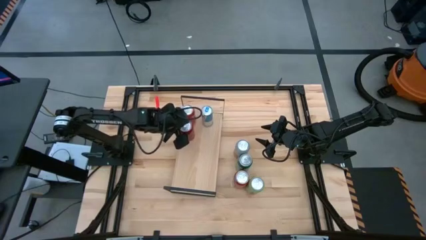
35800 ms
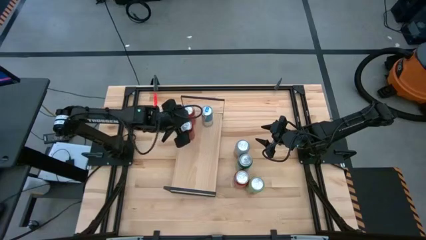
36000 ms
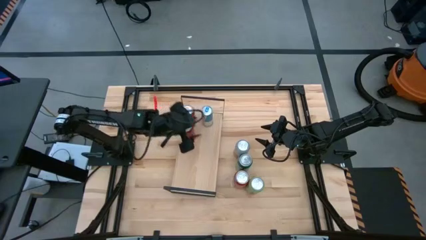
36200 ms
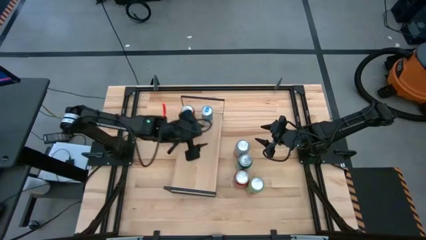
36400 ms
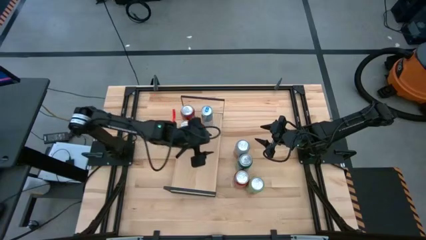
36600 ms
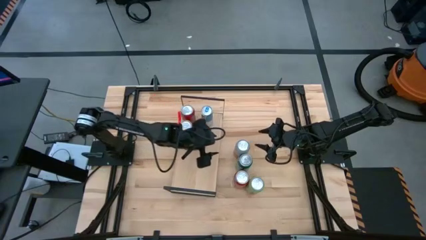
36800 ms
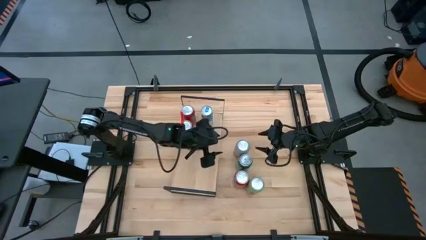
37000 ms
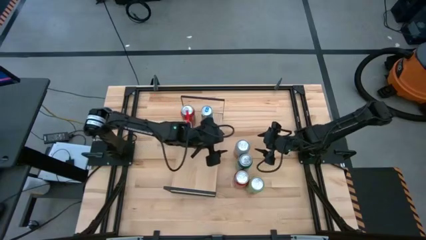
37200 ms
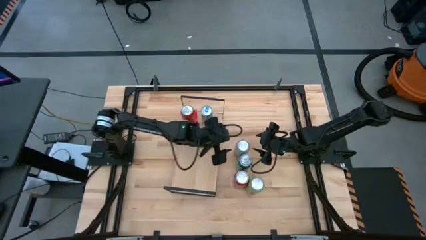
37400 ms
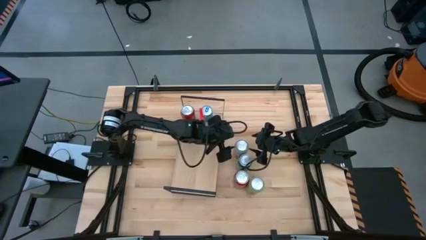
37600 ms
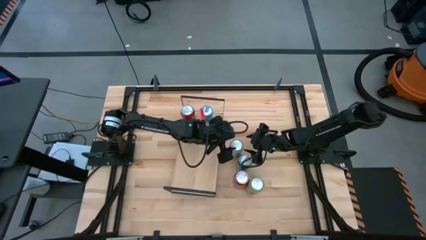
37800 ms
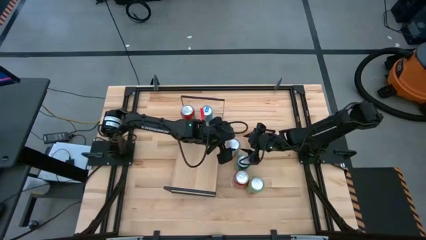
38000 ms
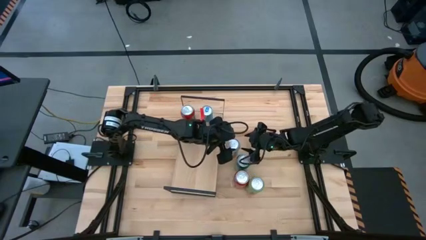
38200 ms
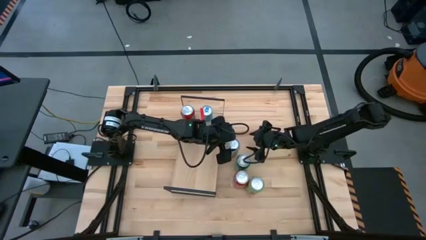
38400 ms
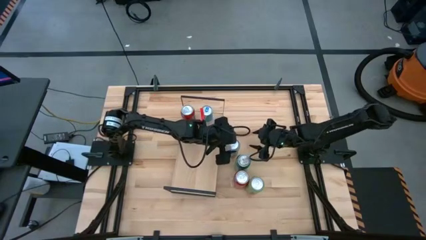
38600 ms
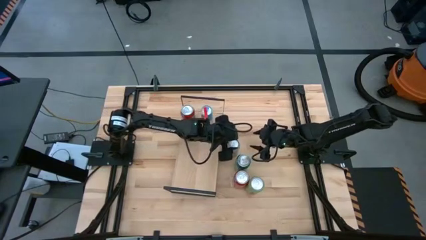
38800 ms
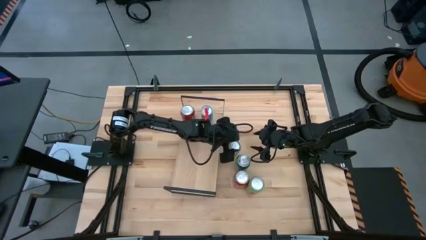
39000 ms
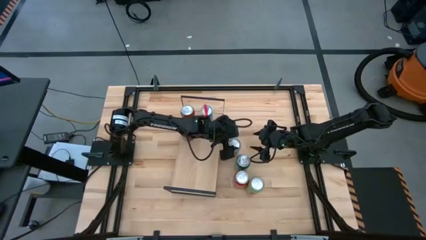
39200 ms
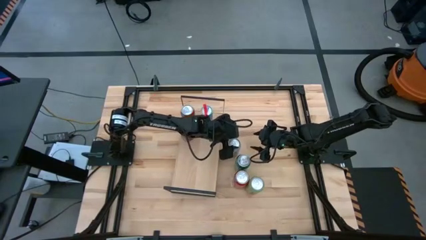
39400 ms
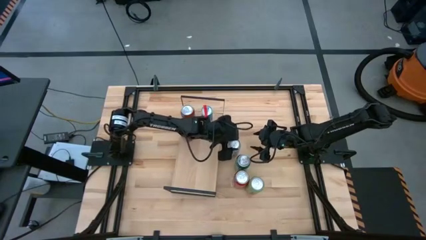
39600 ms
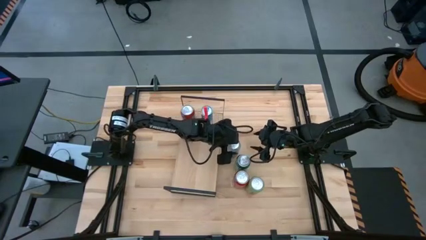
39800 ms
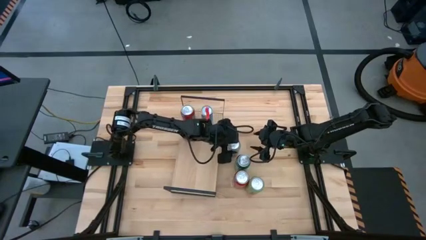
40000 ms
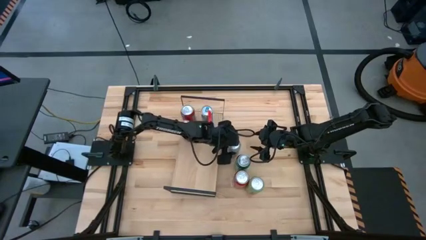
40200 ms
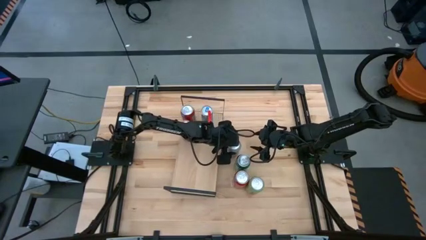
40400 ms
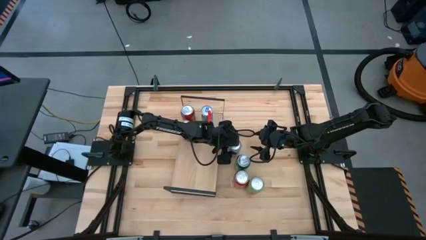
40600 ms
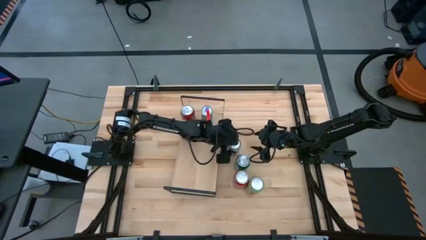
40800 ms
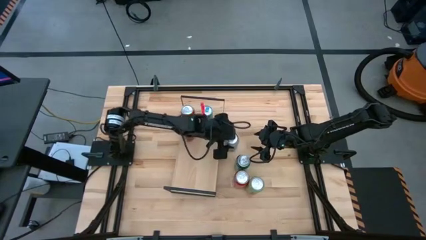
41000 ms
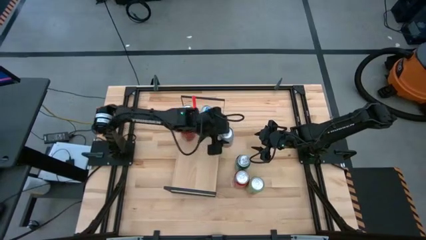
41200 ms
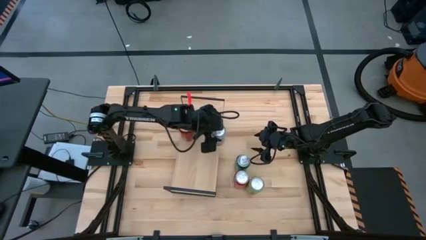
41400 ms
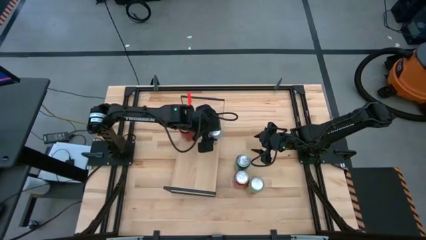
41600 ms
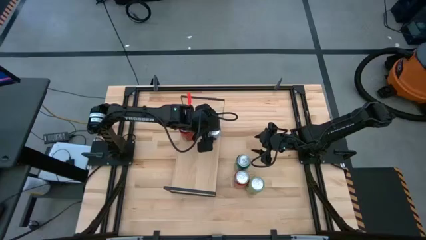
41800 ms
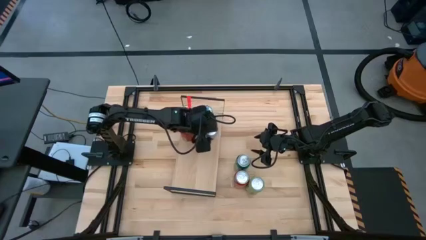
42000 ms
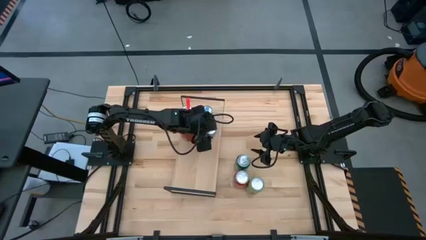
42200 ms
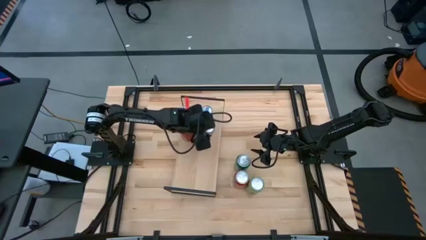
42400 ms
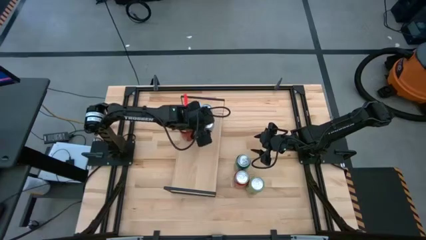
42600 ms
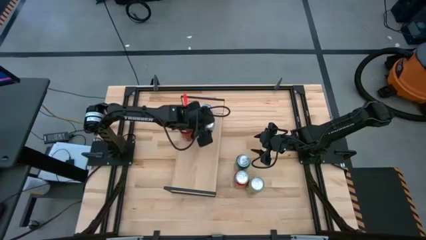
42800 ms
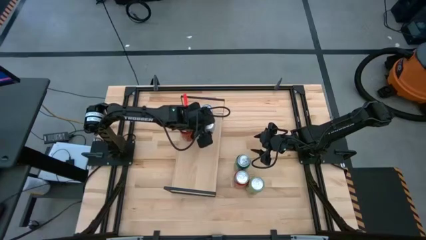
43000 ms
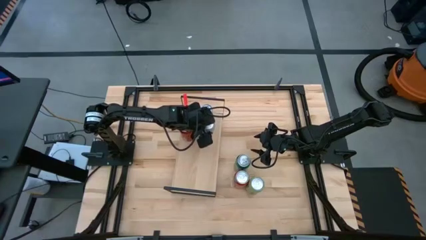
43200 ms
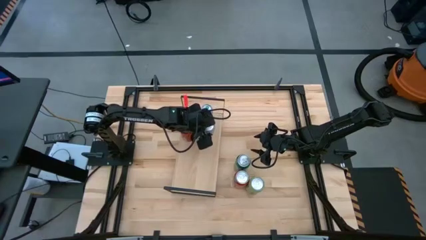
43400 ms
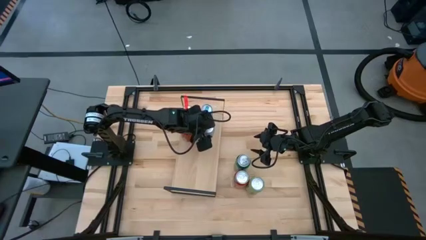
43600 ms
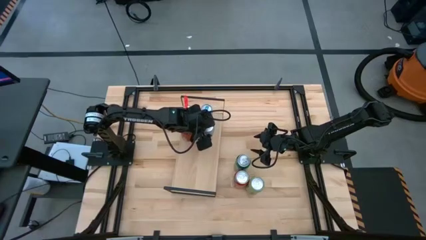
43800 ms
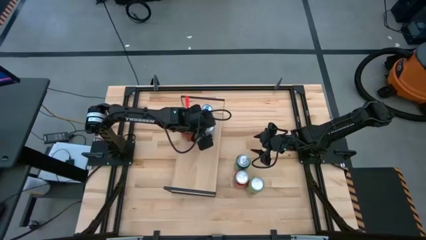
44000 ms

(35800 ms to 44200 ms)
Task: Place canned beverage on shelf
Put the white soda can on the shelf

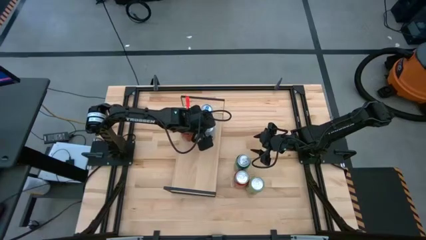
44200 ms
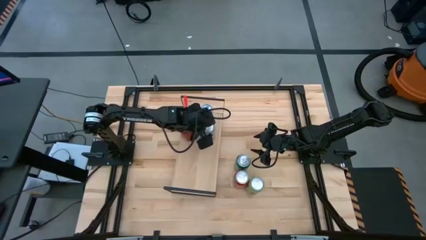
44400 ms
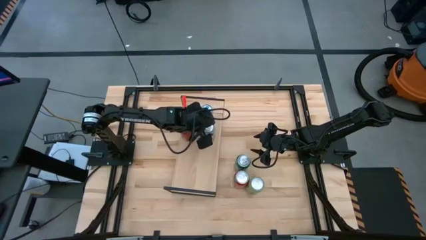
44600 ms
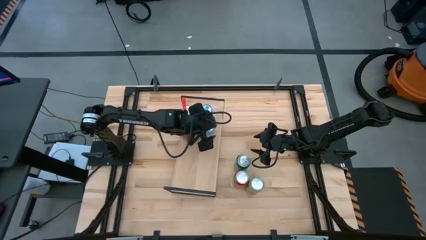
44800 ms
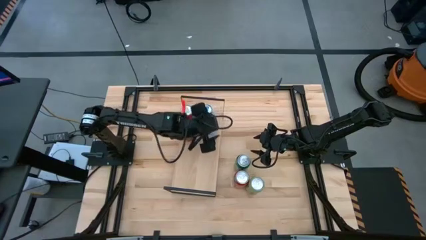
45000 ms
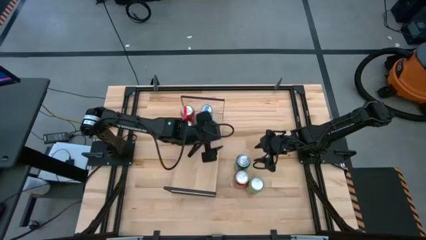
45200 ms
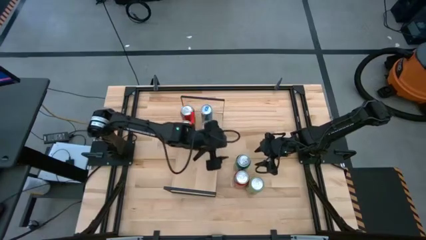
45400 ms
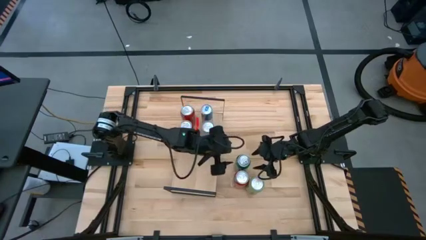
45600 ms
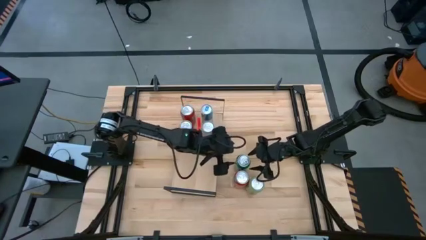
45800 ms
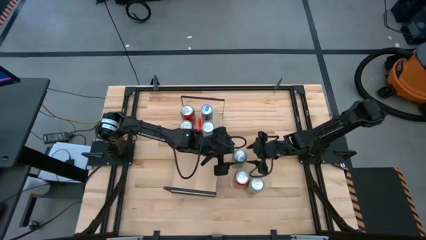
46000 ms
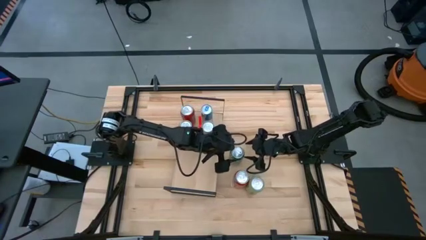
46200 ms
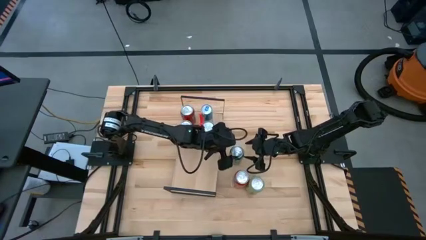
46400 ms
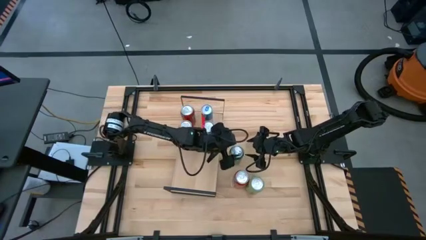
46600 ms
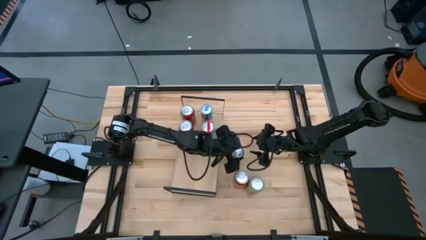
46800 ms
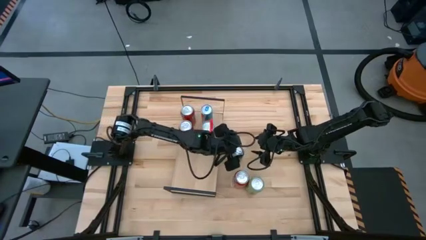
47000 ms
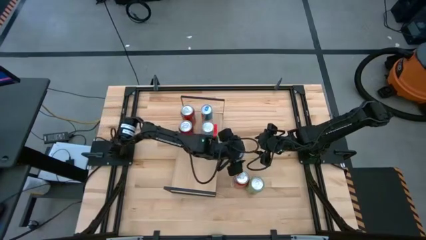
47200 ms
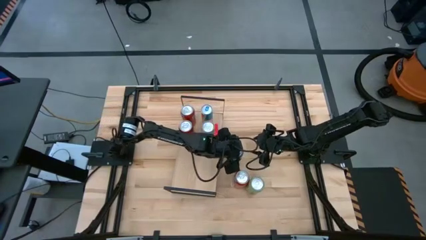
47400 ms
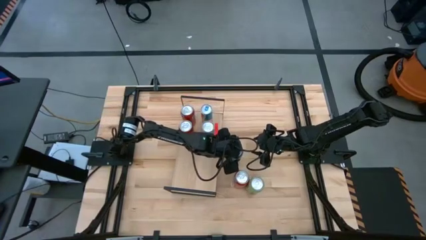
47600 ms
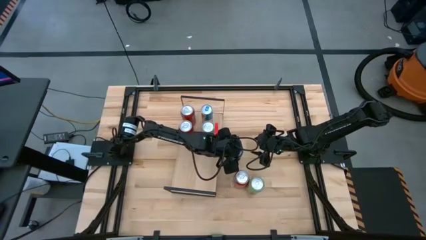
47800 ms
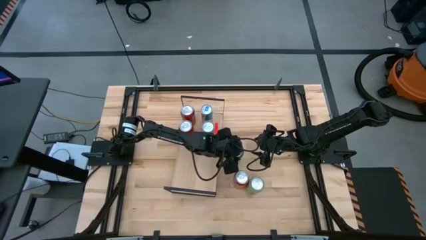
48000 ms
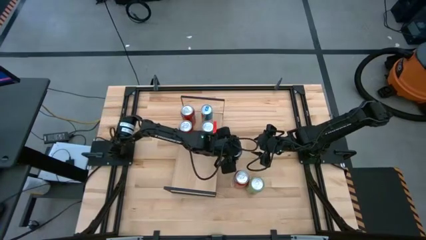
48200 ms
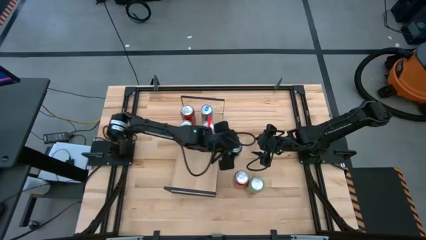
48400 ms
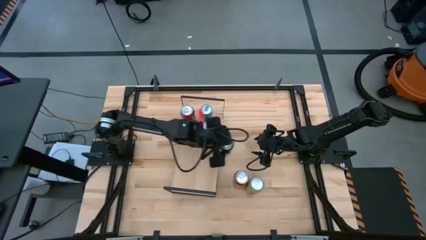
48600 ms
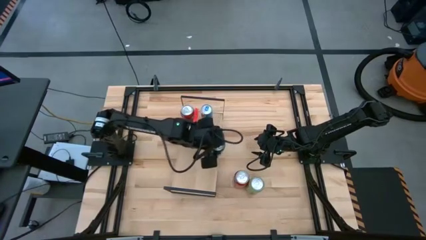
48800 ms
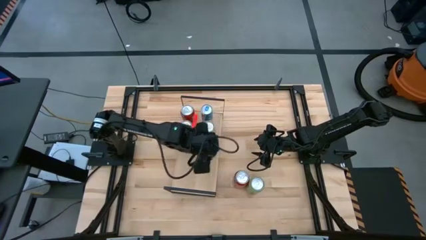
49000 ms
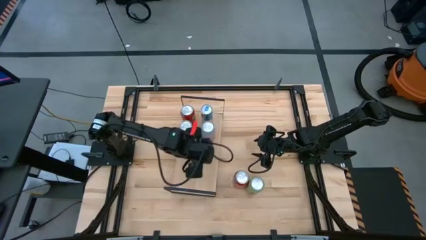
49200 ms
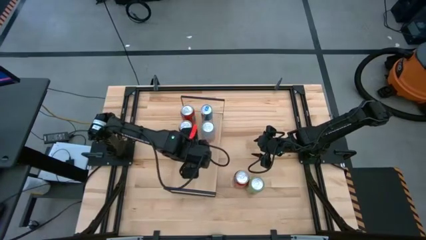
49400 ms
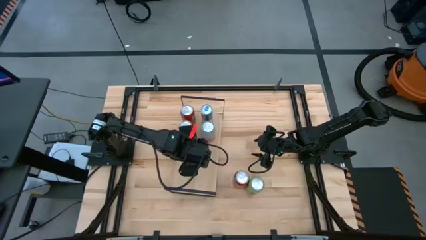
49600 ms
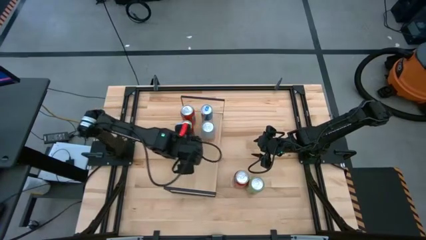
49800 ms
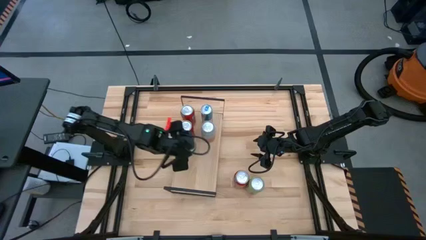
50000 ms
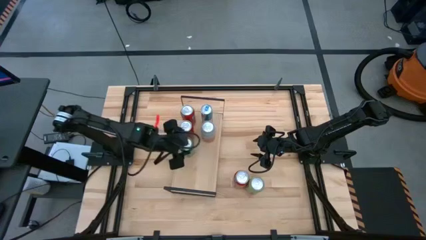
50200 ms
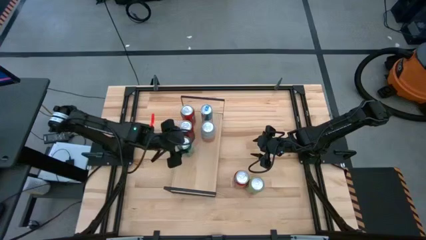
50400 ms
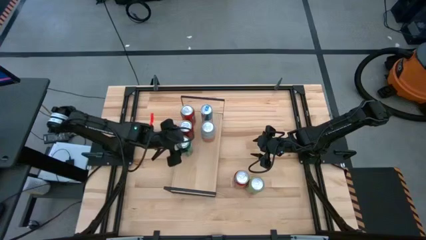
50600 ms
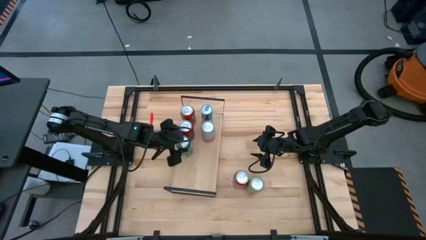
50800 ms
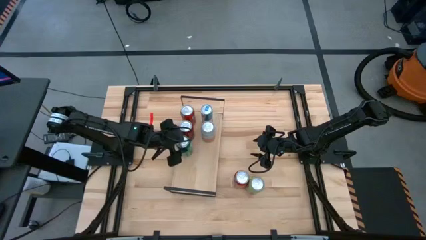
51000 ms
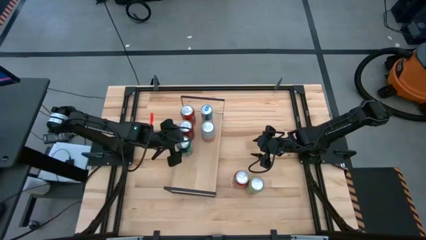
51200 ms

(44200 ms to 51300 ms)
Put the green soda can on the shelf
